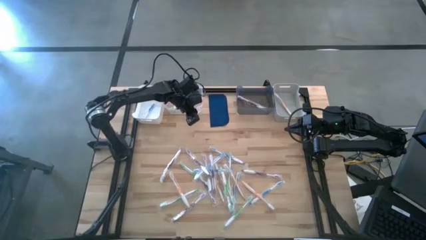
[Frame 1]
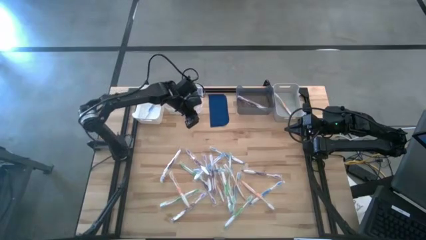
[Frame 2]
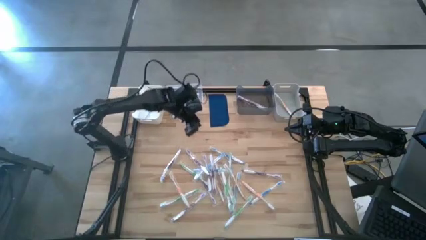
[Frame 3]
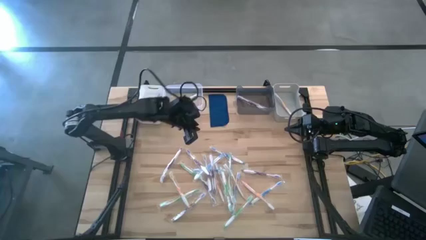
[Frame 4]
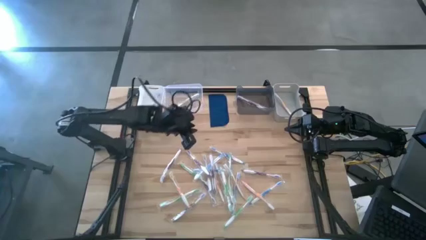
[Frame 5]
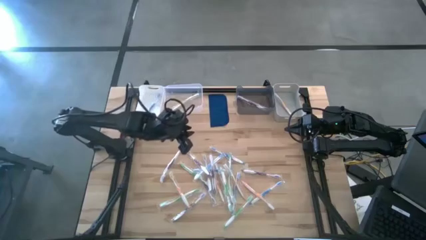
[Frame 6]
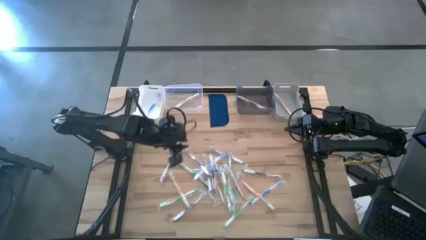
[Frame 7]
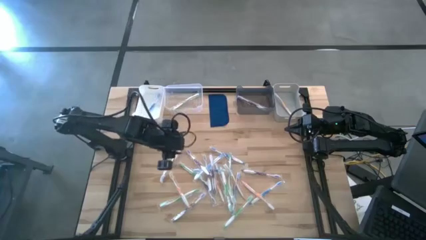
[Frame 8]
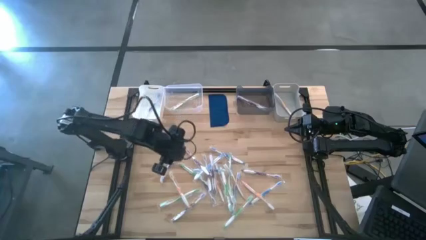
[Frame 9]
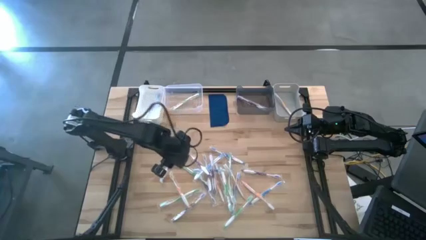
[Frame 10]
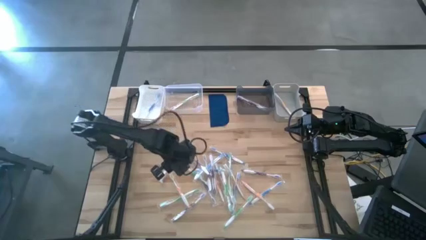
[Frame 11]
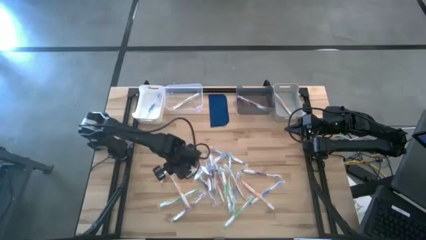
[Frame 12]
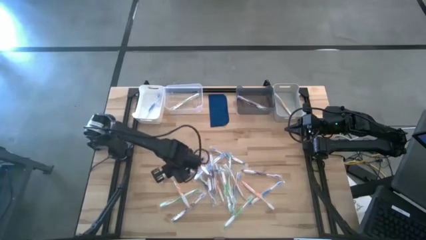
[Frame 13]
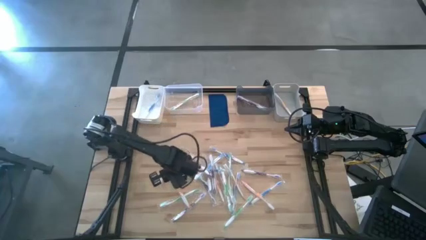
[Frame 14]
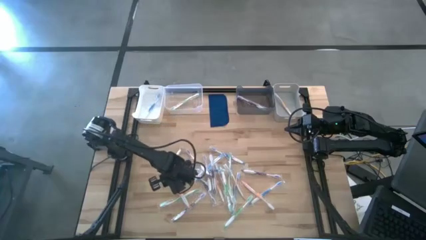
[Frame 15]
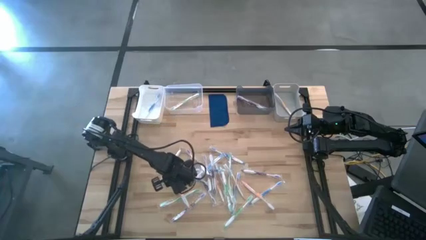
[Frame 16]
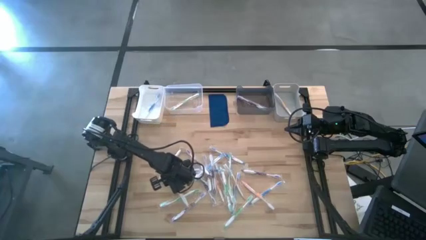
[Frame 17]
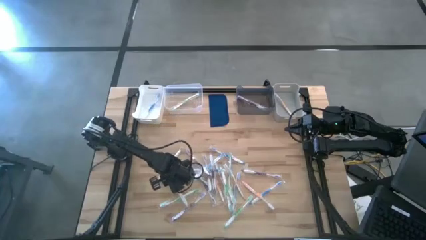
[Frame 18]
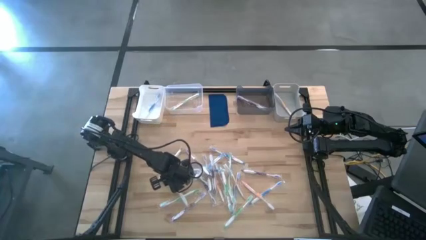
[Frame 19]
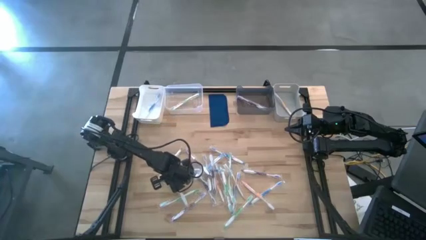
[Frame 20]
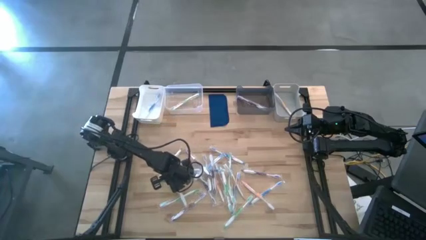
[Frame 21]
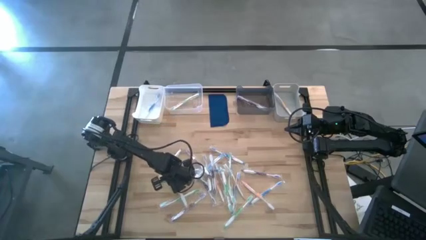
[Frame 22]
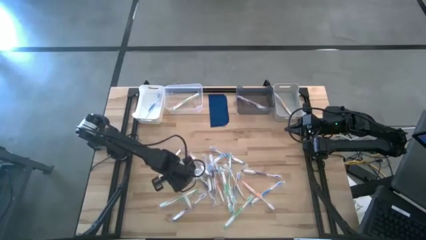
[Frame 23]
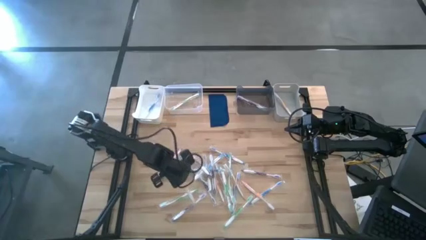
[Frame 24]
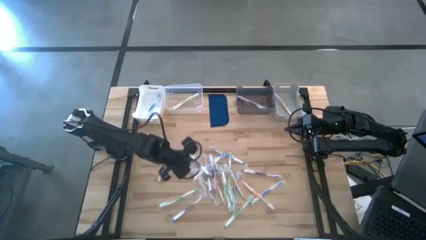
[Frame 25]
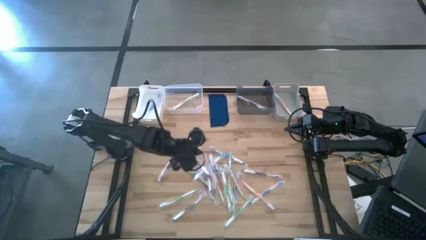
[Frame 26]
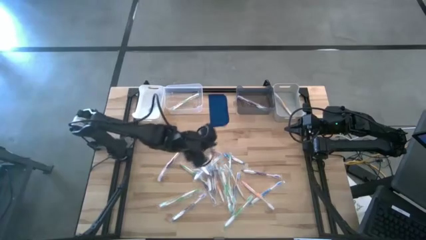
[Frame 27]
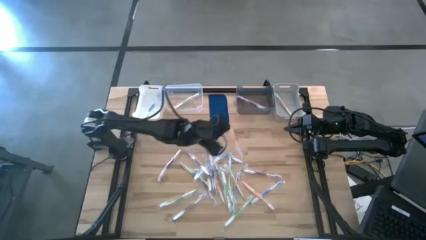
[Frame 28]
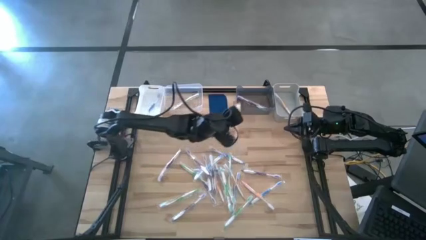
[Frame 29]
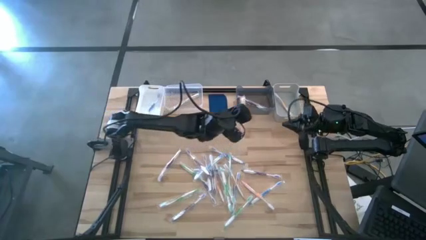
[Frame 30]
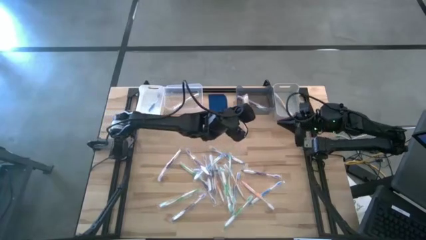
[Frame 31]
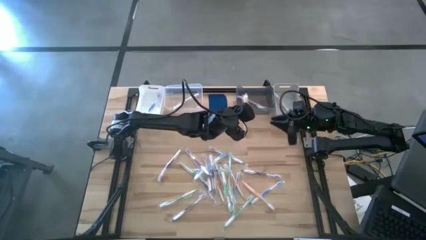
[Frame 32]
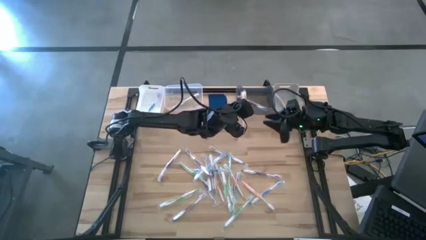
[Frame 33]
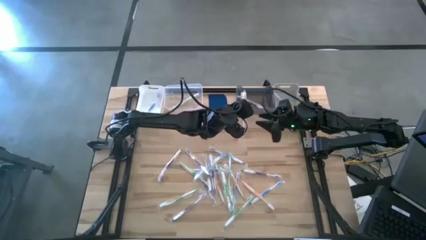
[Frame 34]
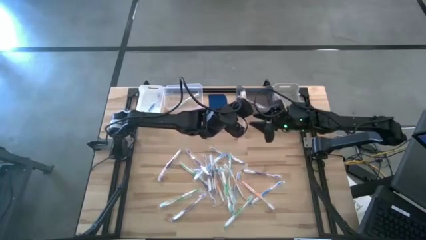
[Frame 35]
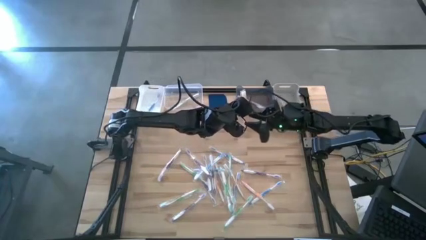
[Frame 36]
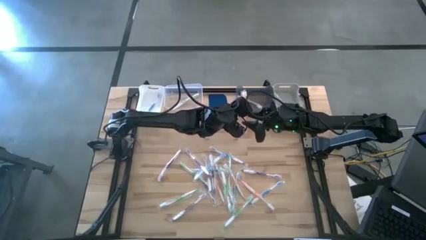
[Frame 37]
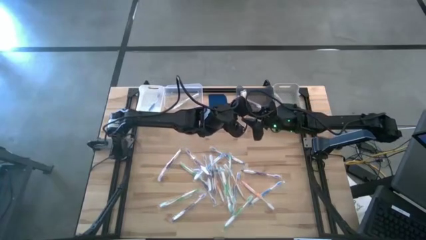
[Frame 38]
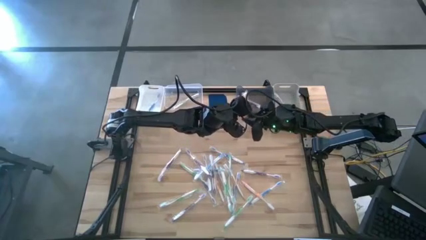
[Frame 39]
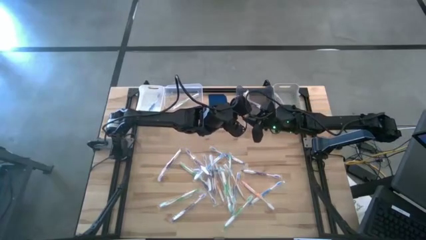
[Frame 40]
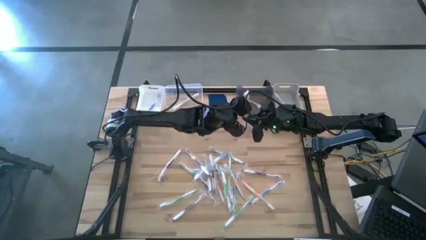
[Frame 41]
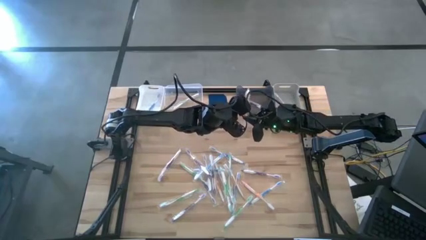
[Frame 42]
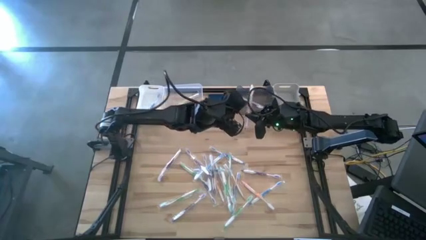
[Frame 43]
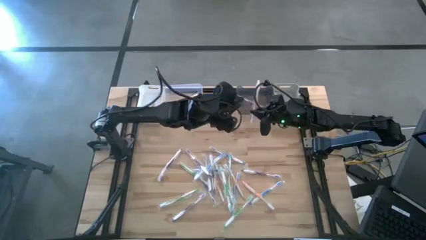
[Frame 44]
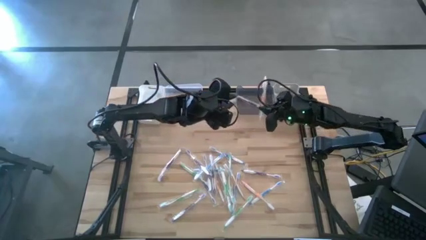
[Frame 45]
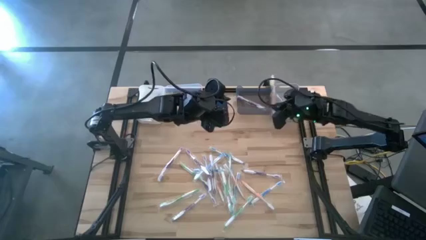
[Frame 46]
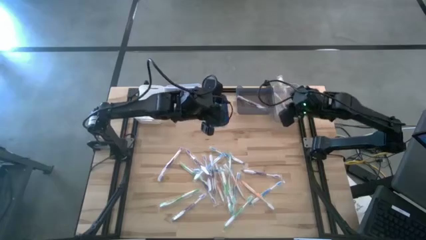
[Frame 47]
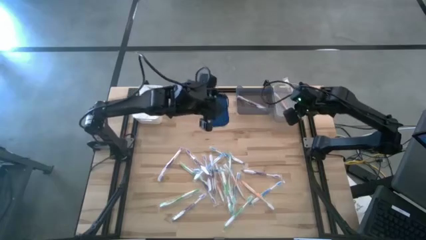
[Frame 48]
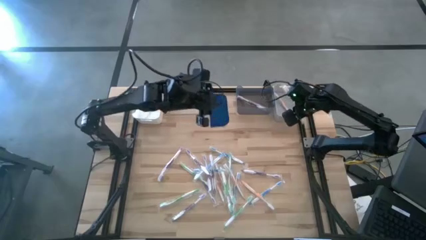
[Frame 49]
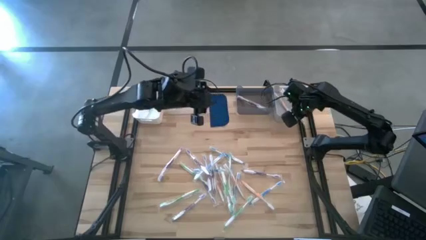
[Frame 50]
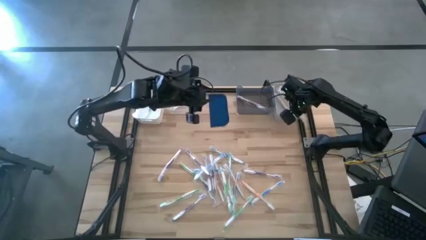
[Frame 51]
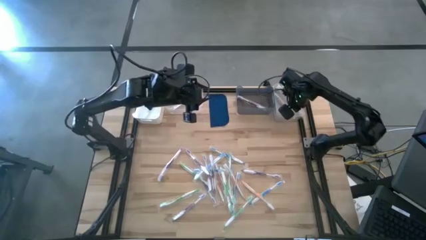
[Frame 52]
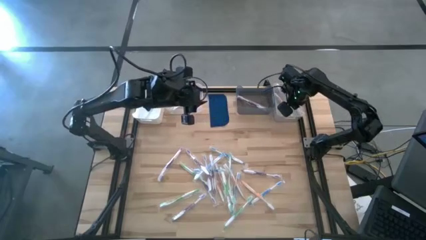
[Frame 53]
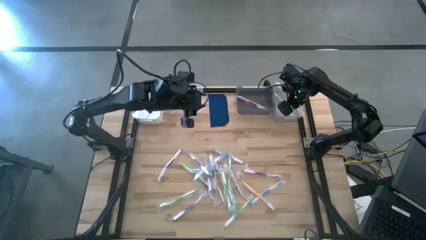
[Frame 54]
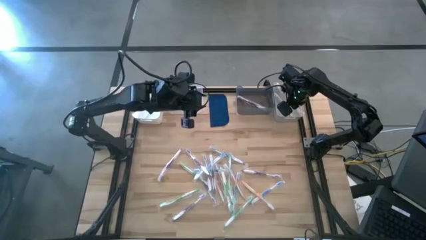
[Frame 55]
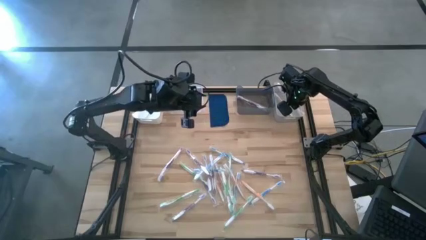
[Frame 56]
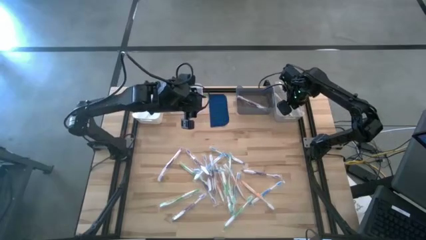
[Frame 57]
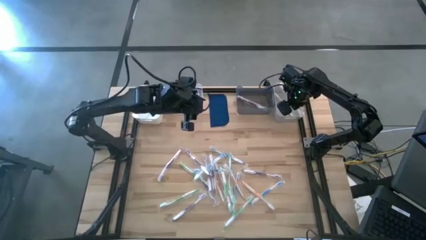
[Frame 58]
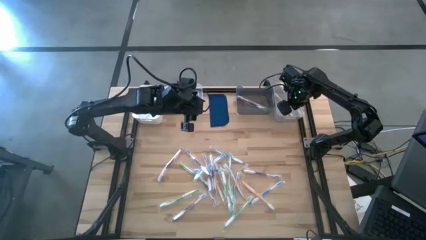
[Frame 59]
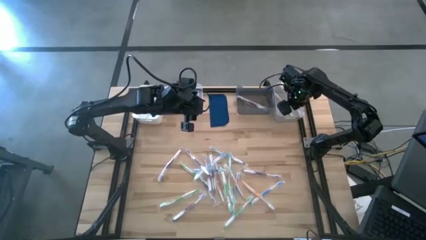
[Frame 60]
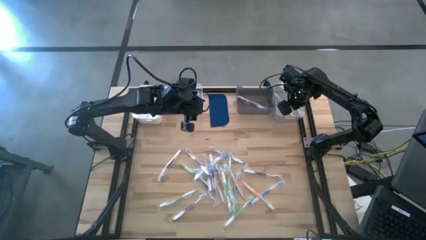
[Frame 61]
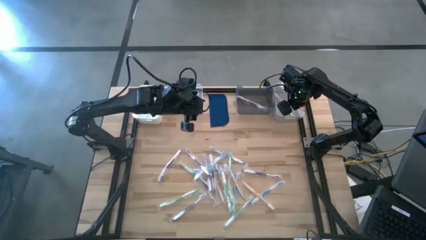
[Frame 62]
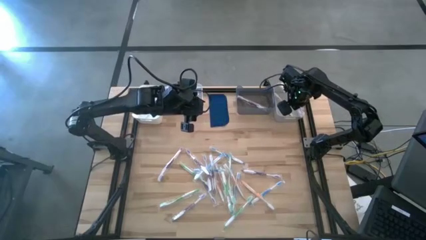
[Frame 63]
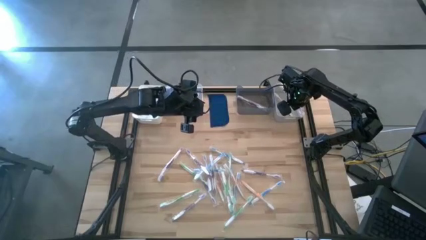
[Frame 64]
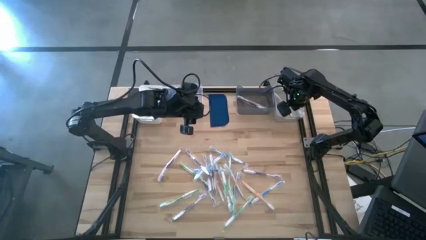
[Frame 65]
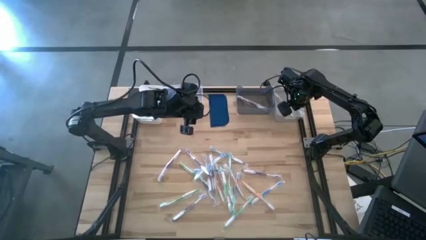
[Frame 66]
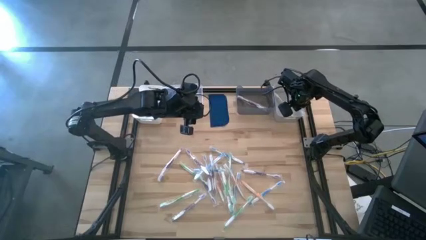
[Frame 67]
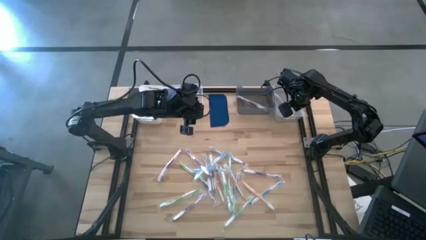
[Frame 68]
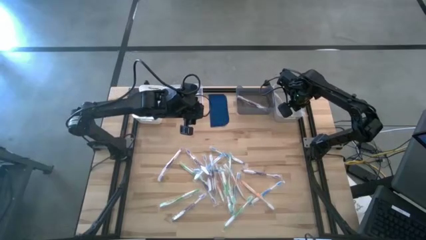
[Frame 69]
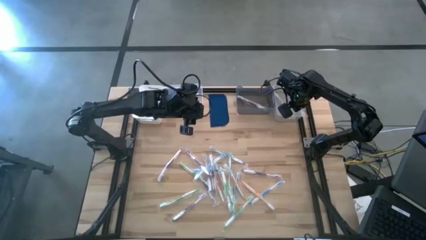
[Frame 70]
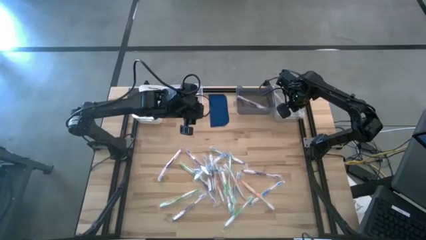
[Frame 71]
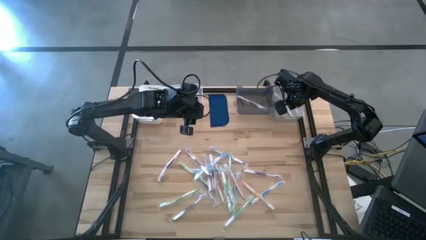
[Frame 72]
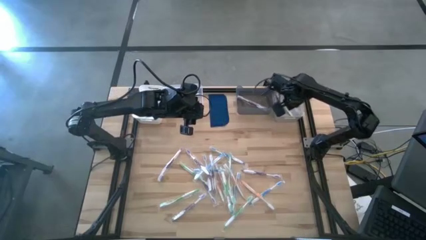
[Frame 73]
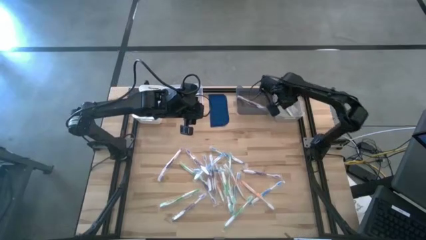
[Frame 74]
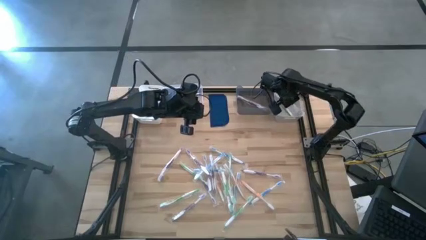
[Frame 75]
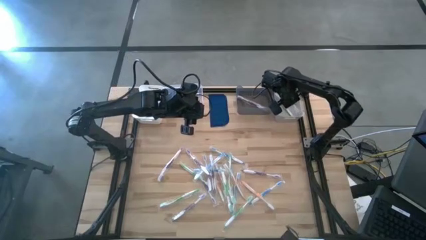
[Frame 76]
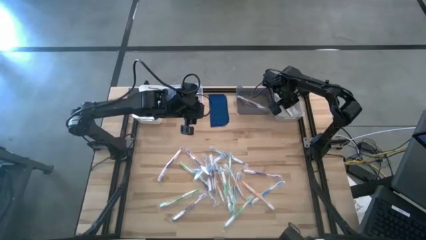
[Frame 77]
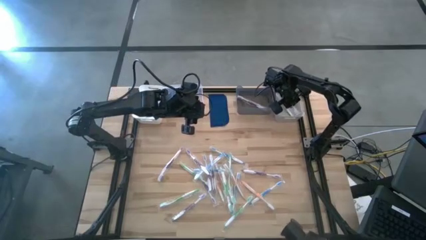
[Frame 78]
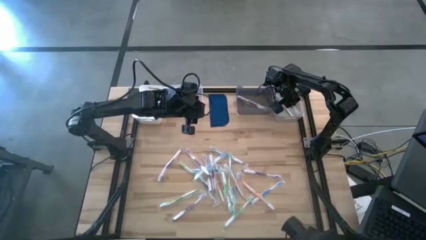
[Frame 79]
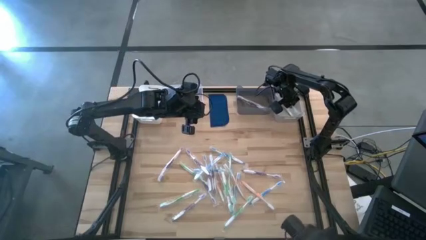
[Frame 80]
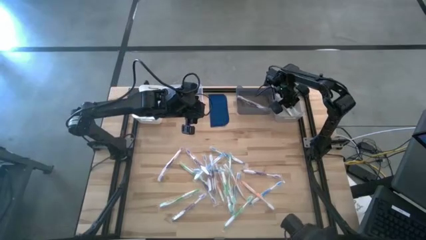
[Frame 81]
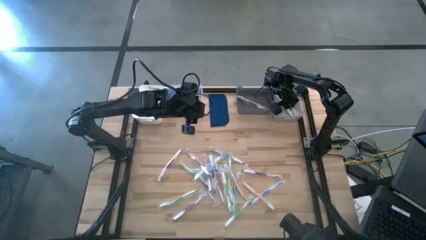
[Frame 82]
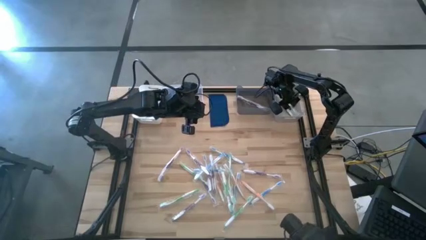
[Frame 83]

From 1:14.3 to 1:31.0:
Task: Pick & Place Toothbrushes
Put the orange toothbrush into the gray bin

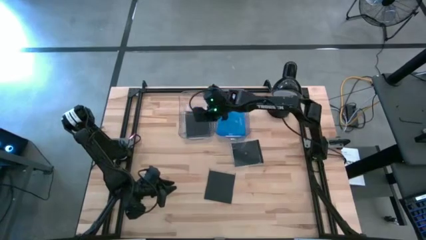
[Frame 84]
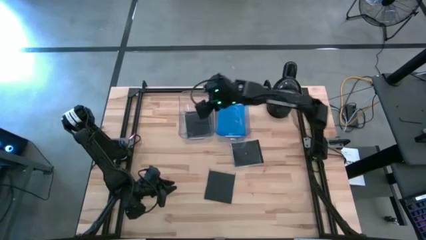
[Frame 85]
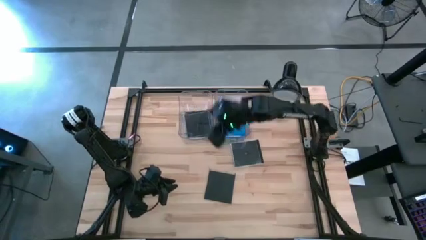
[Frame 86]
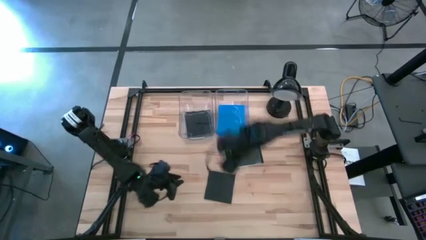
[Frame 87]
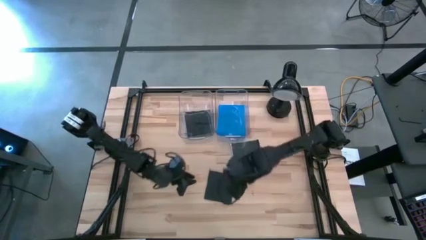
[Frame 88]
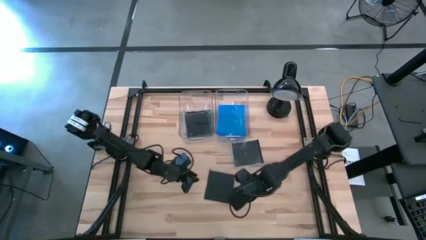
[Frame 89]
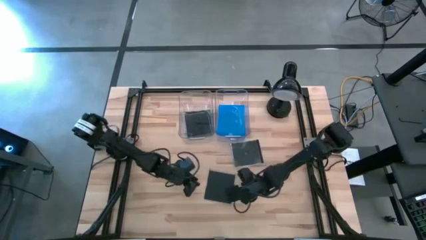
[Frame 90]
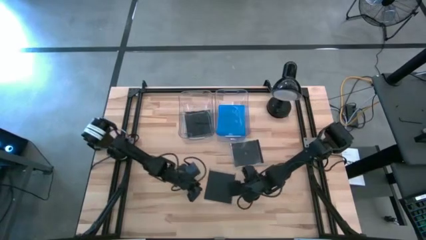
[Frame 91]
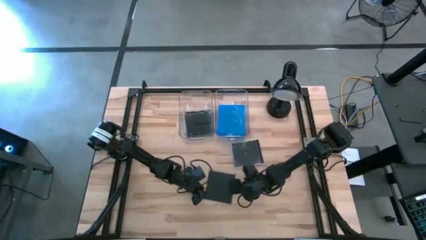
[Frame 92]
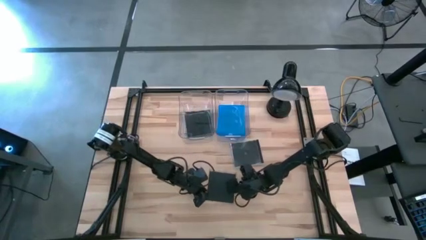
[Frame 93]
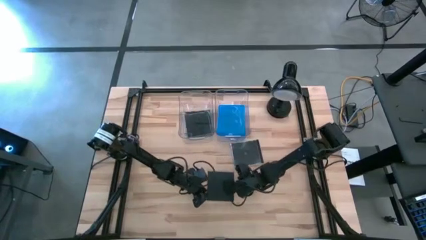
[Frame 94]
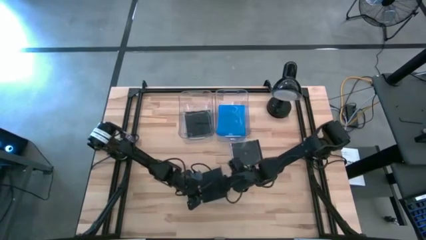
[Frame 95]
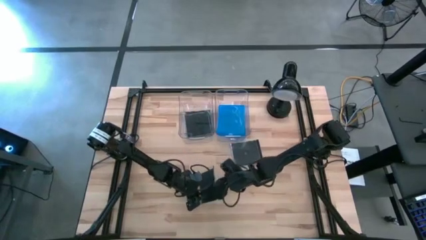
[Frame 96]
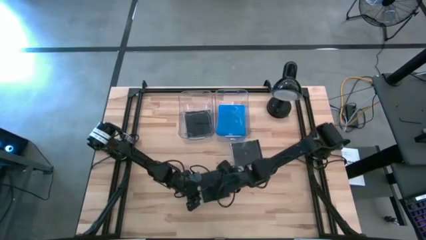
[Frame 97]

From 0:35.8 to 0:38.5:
Task: Pick & place jewel cases by type
Put the bottom black CD case into the left transparent bin
